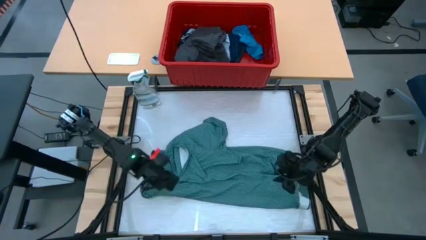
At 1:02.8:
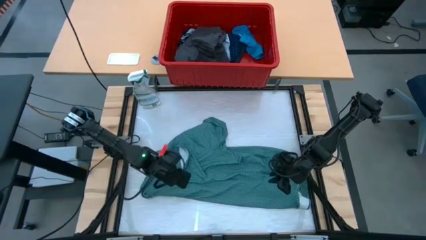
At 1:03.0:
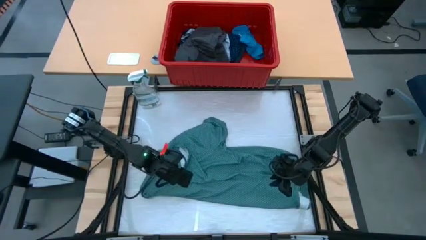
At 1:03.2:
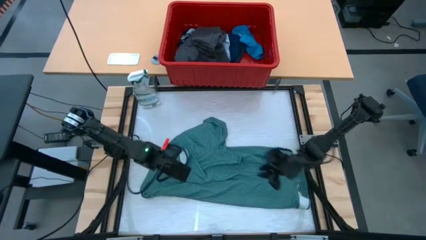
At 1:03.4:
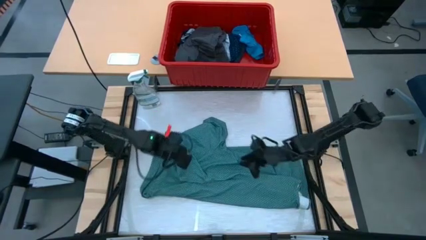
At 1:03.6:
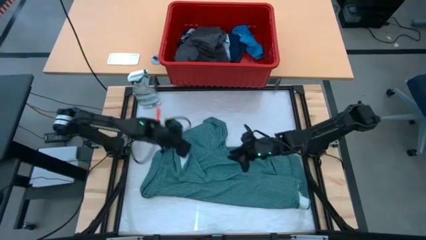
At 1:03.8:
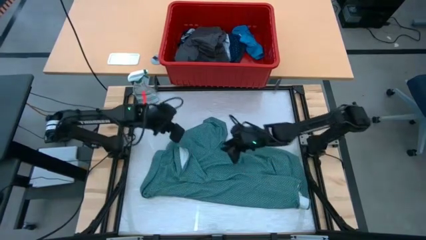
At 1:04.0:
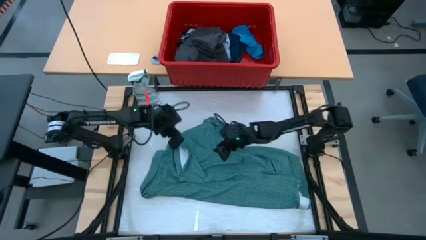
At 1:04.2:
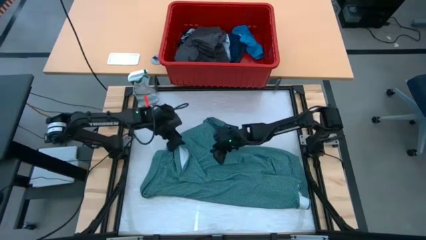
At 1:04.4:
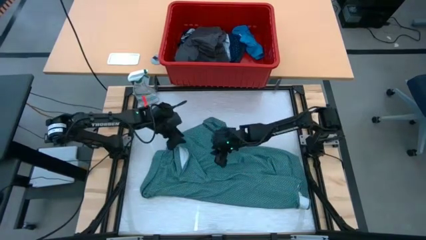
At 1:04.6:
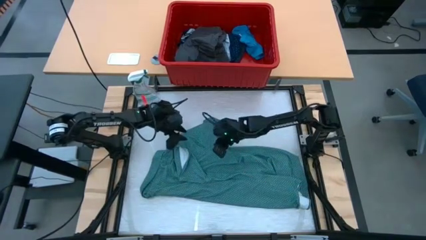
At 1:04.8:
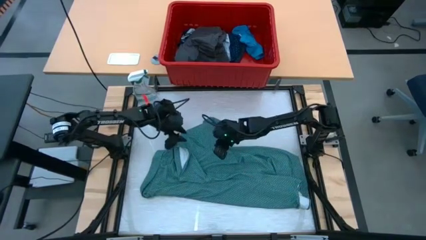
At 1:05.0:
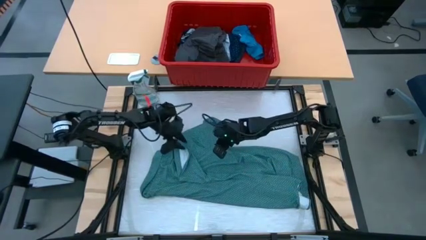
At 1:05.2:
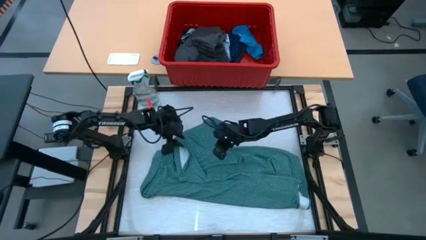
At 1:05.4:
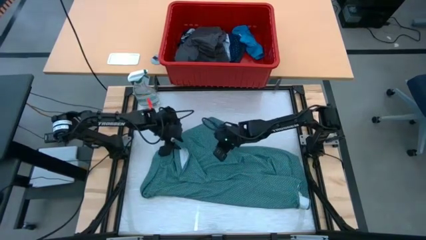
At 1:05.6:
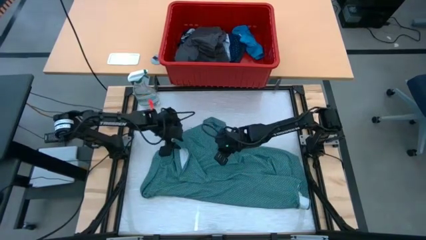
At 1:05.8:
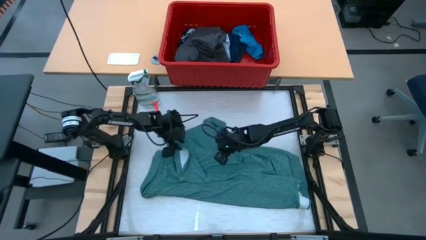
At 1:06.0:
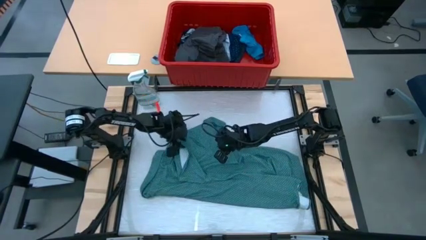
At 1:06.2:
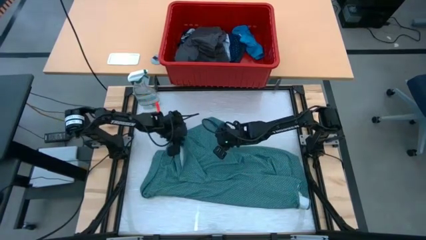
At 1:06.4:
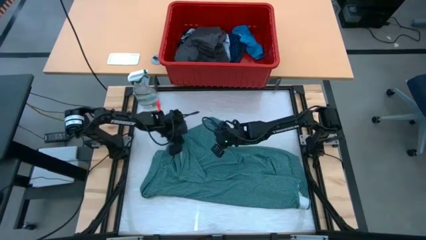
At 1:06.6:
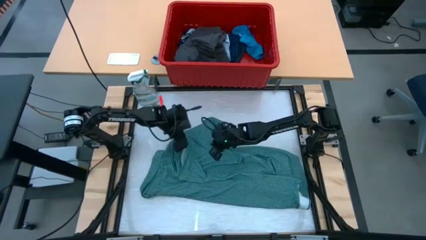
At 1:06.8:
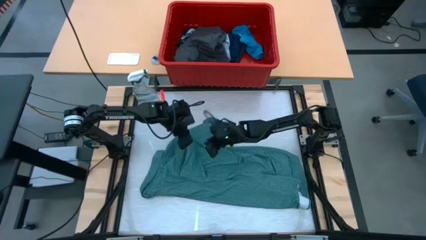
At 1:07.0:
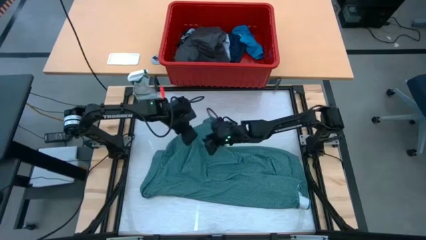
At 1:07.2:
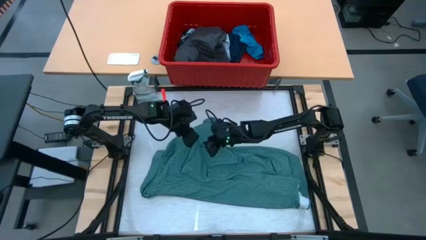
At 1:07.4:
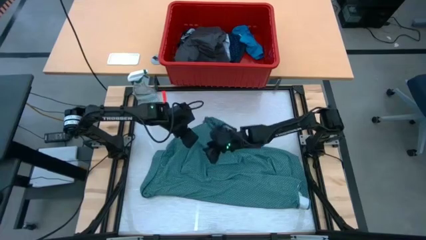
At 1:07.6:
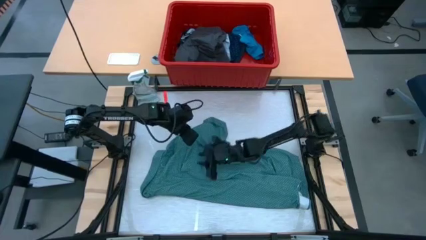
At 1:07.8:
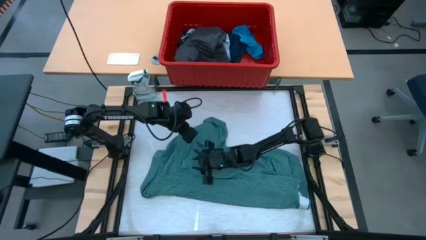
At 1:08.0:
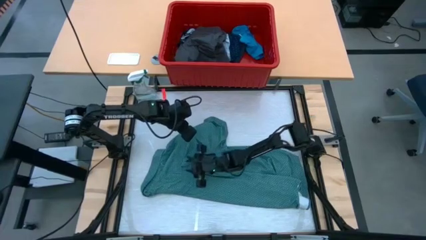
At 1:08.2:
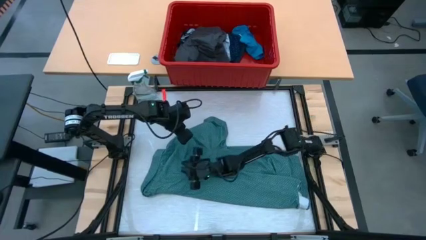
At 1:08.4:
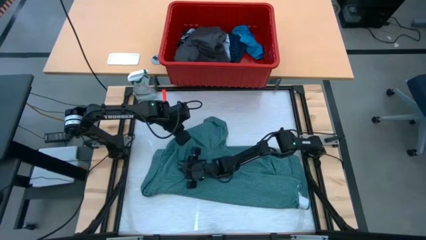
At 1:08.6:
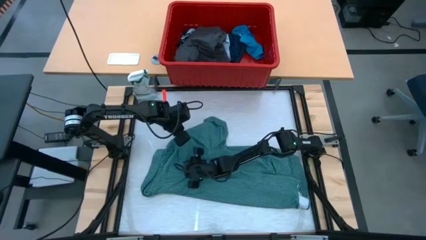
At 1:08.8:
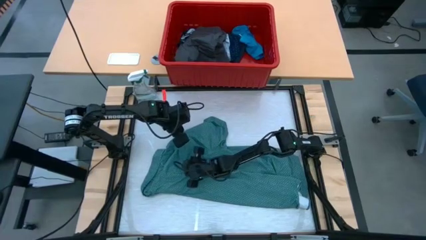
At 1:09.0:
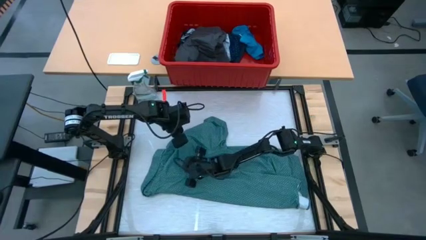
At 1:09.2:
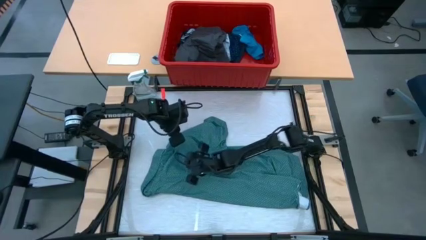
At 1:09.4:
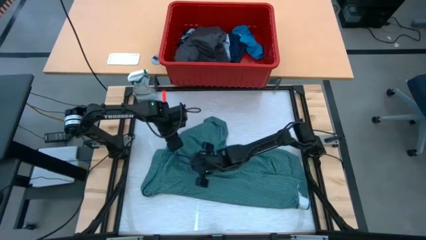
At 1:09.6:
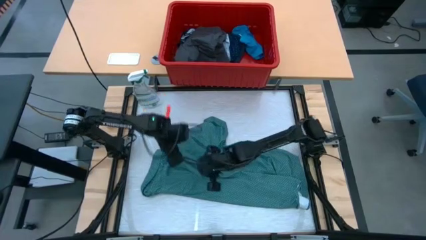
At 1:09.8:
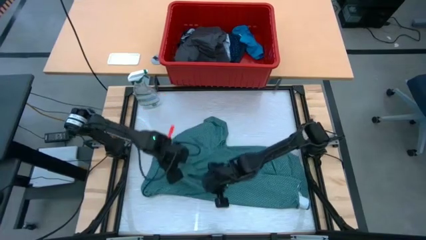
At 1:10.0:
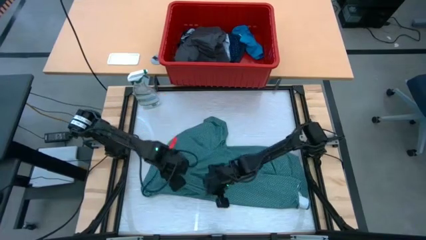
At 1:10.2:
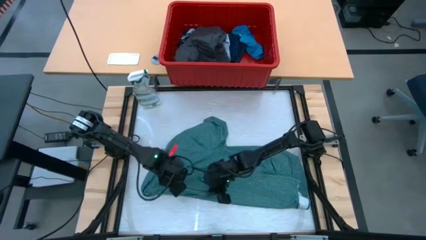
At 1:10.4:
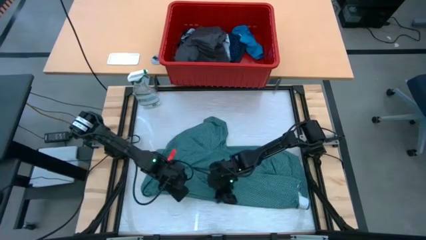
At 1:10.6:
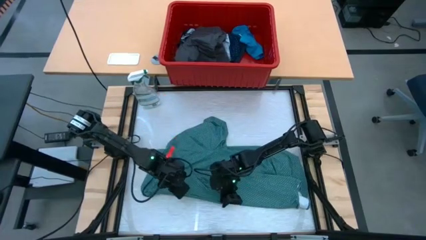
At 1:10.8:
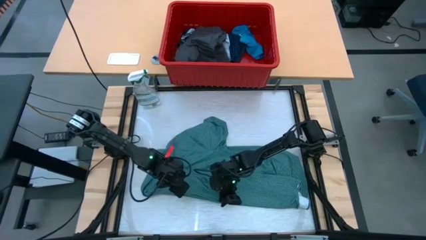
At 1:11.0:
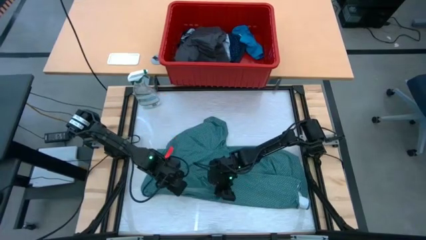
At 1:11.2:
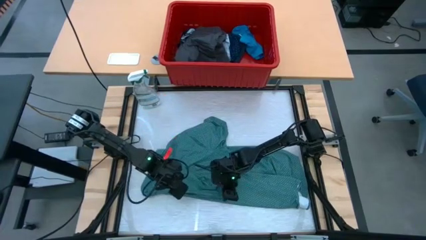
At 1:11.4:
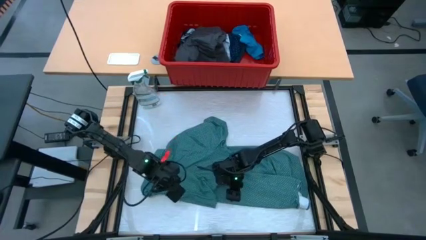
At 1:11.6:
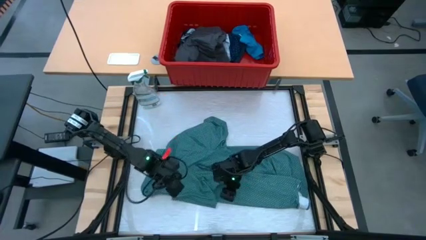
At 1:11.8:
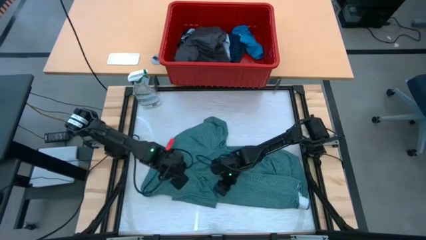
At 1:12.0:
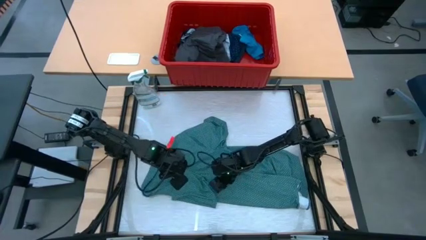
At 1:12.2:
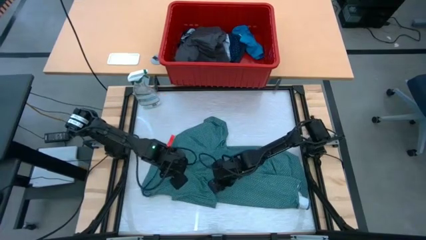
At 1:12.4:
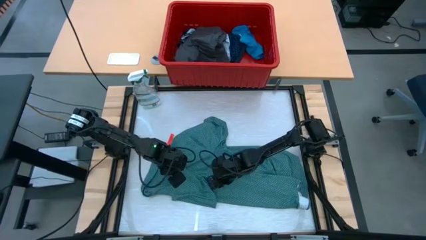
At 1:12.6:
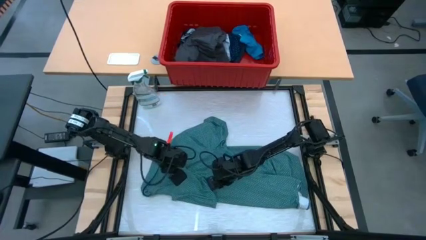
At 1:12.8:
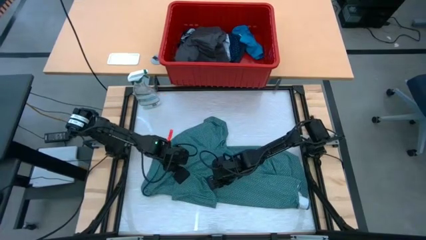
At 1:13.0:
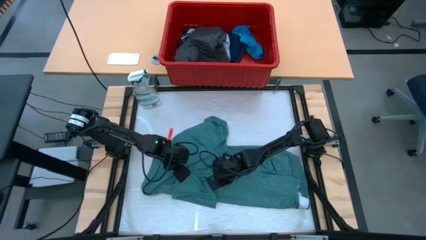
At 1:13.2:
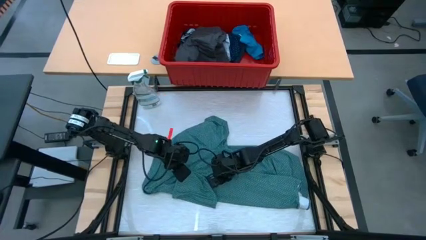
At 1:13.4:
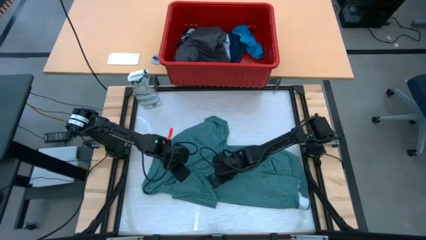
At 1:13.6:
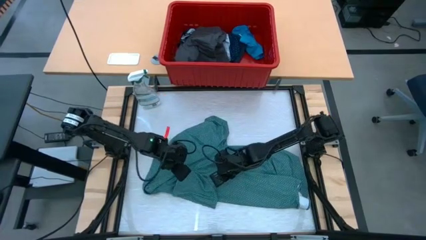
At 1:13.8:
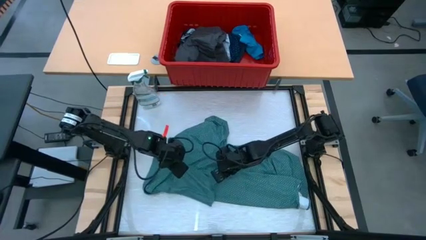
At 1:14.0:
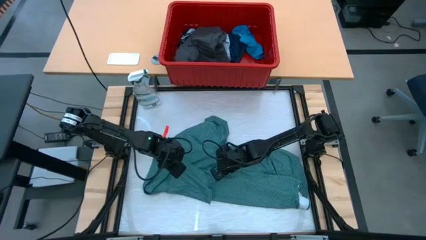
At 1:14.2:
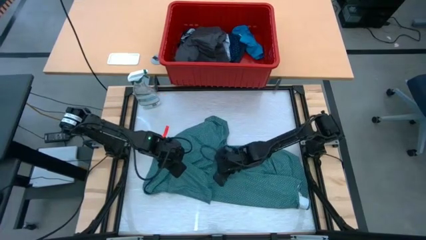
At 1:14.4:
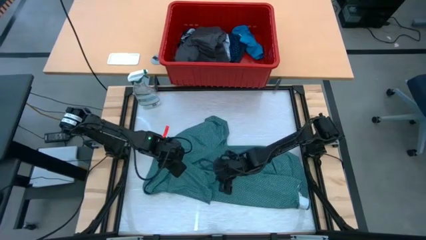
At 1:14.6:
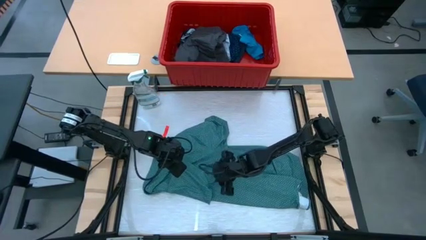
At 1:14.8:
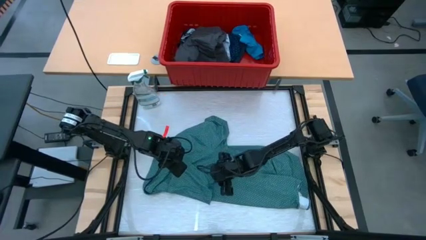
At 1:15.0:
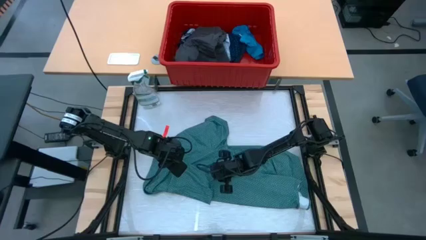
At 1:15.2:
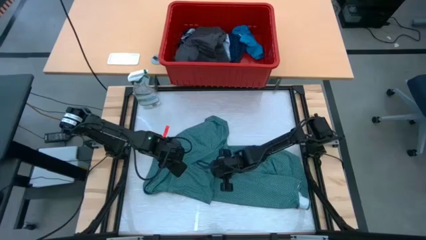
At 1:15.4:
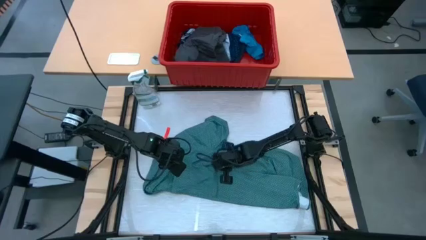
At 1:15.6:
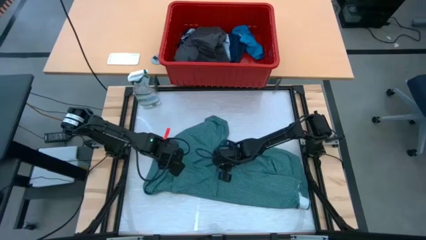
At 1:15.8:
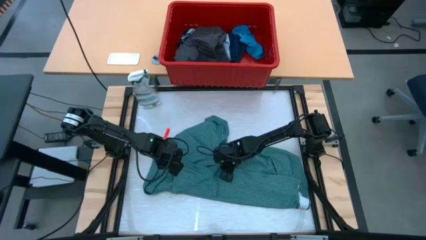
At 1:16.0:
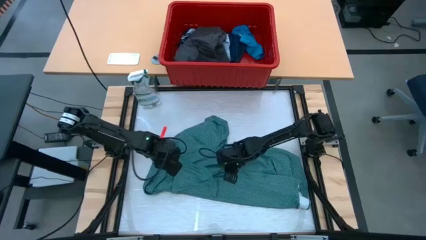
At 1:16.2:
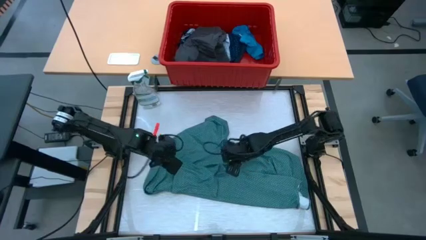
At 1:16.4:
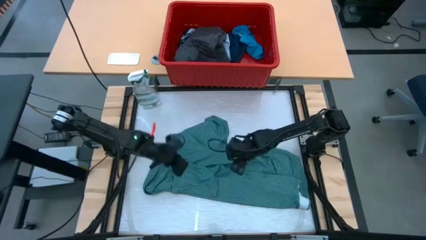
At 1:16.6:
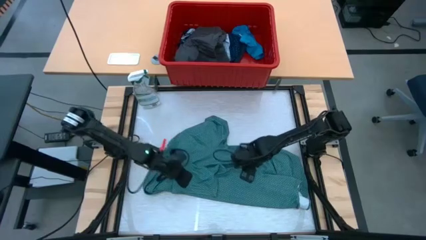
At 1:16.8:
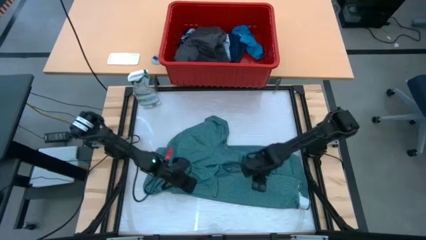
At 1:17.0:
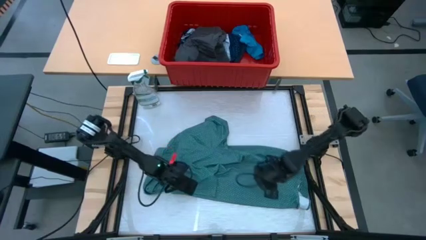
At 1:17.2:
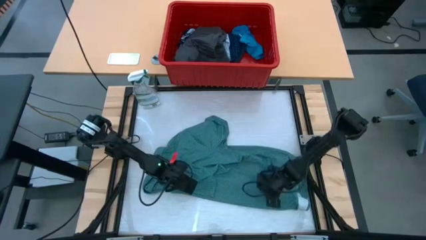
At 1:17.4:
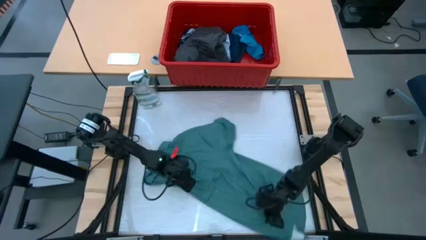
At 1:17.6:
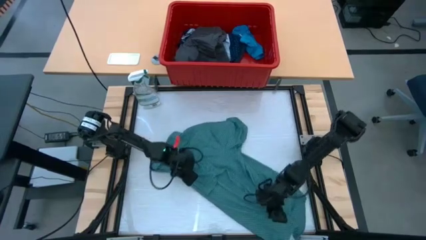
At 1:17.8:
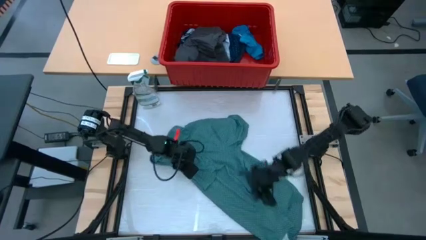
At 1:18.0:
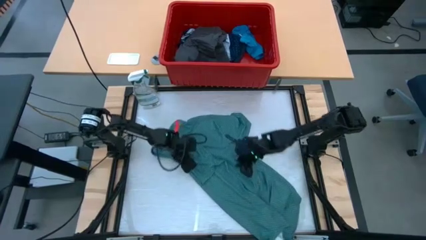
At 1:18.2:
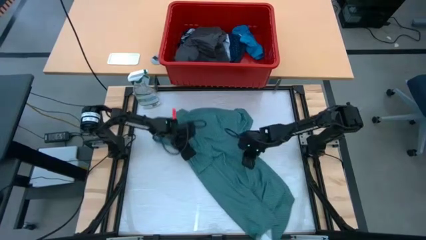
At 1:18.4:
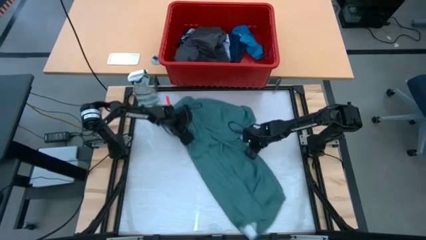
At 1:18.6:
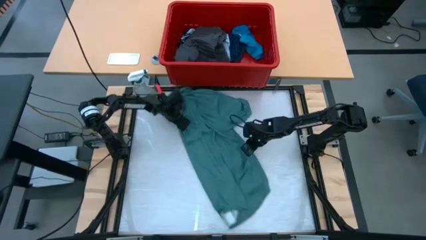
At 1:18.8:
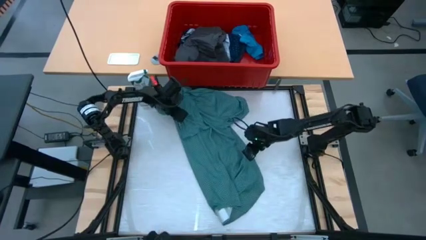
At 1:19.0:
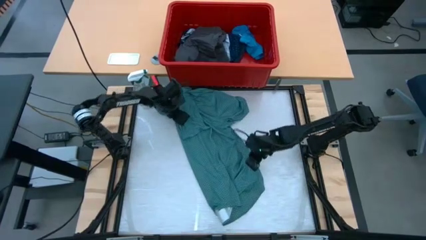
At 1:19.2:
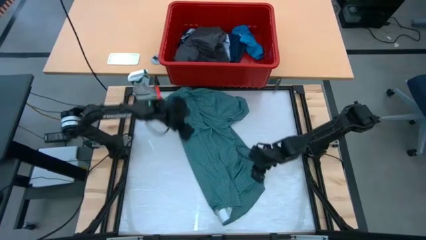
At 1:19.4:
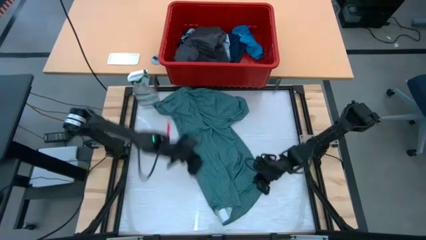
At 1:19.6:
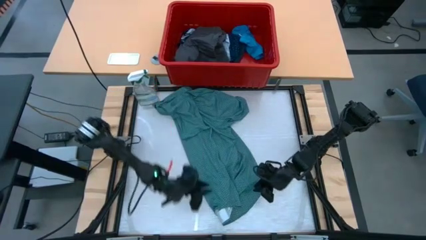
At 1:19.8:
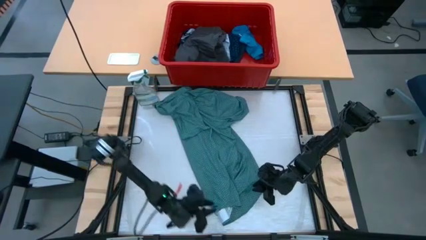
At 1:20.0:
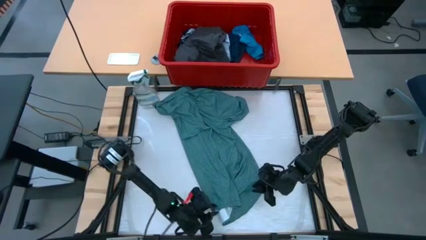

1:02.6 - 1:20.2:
Task: Fold laundry
Fold the green shirt
